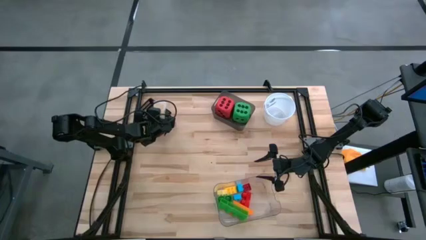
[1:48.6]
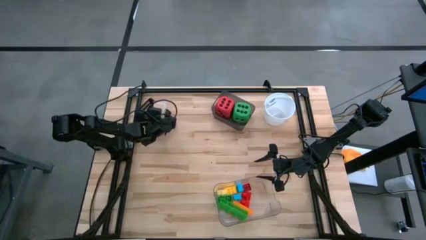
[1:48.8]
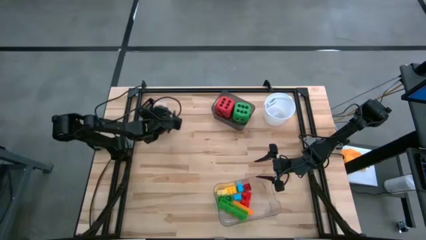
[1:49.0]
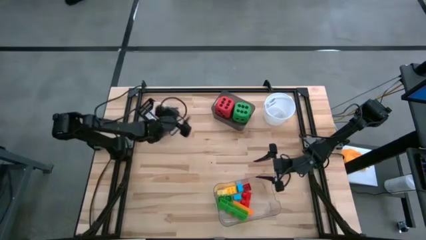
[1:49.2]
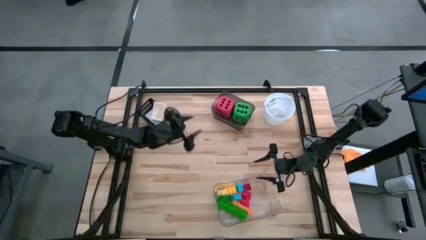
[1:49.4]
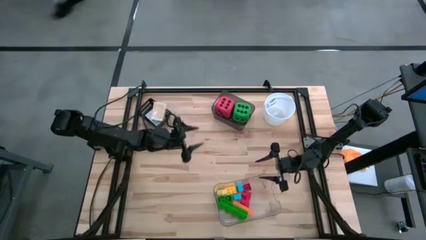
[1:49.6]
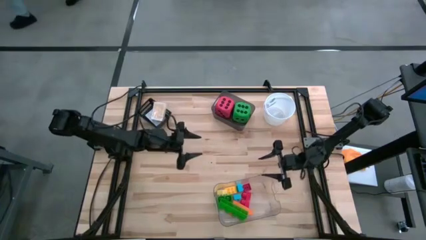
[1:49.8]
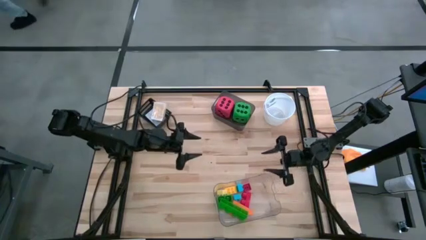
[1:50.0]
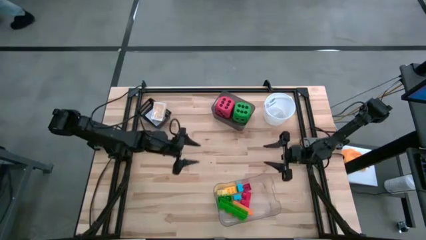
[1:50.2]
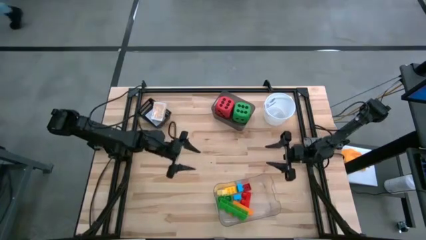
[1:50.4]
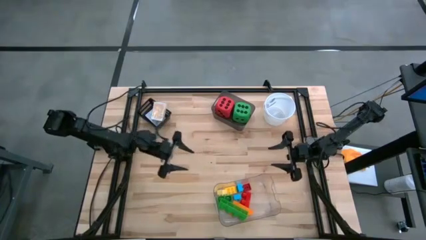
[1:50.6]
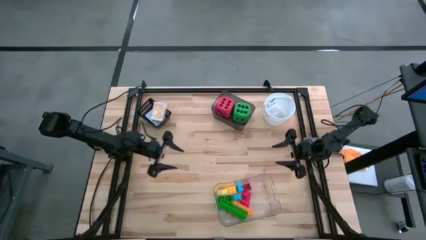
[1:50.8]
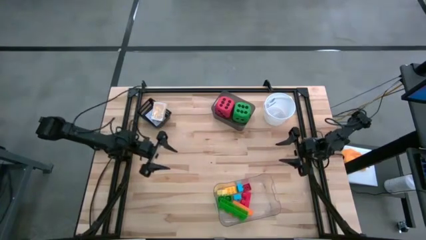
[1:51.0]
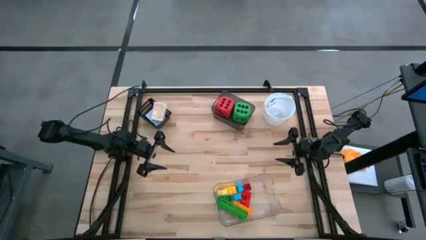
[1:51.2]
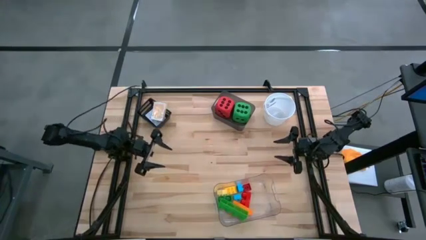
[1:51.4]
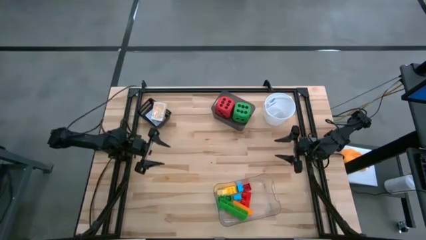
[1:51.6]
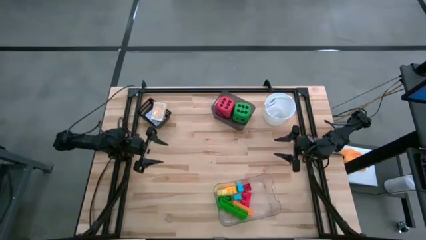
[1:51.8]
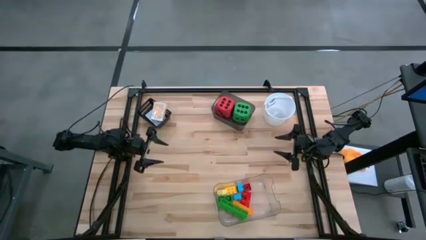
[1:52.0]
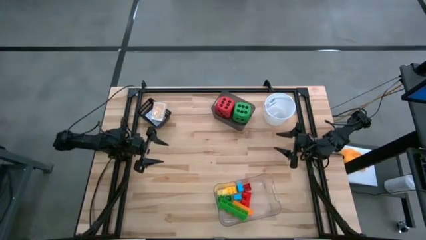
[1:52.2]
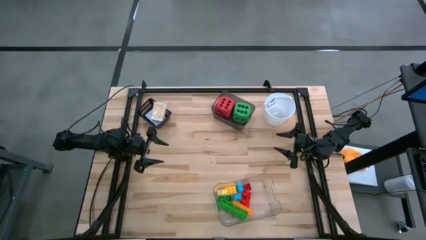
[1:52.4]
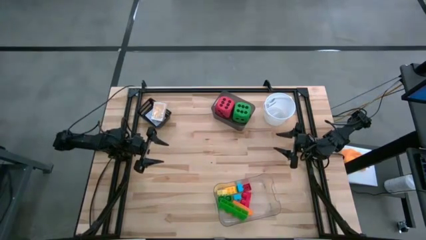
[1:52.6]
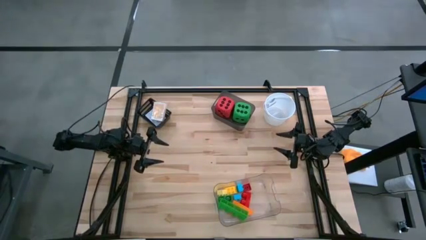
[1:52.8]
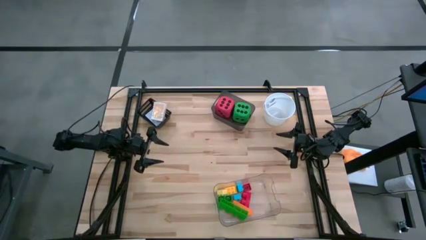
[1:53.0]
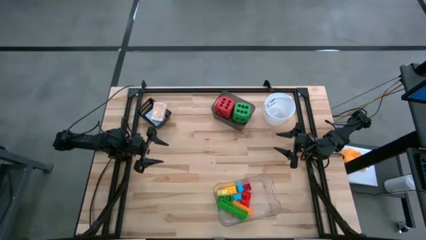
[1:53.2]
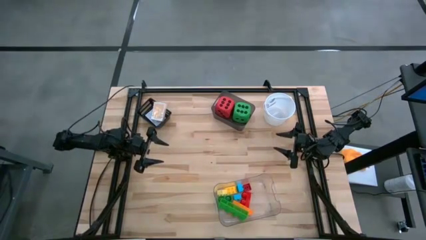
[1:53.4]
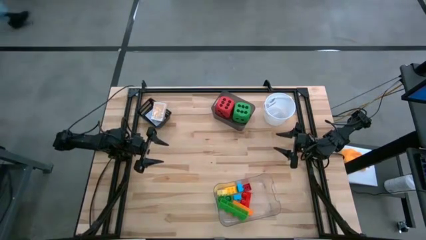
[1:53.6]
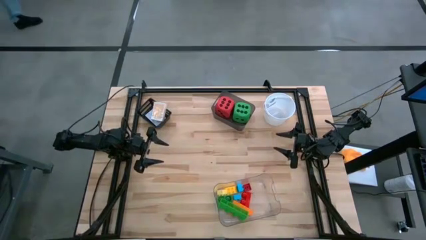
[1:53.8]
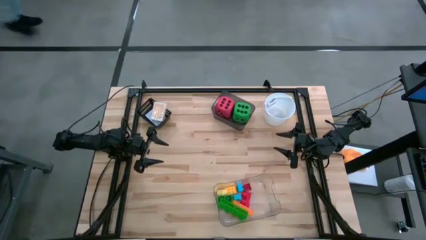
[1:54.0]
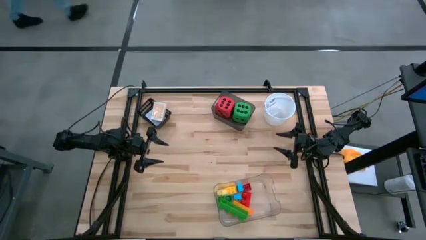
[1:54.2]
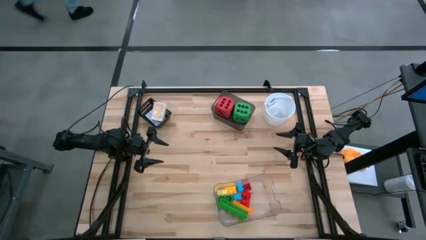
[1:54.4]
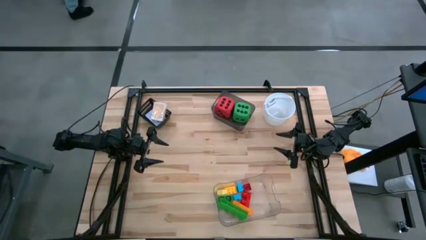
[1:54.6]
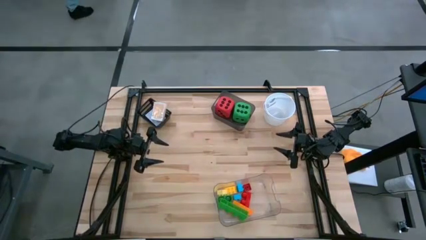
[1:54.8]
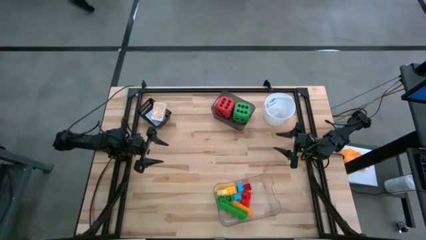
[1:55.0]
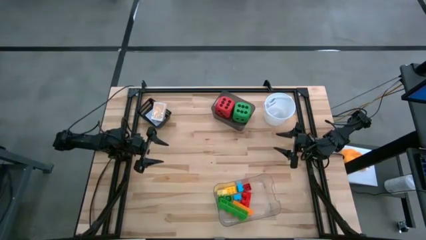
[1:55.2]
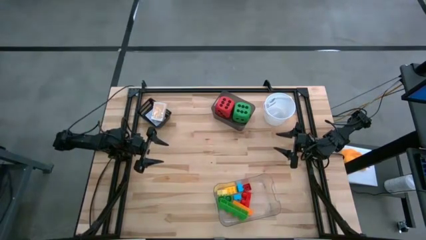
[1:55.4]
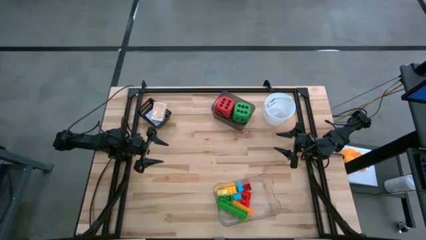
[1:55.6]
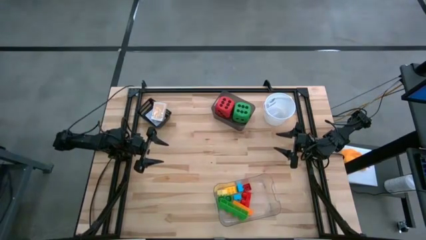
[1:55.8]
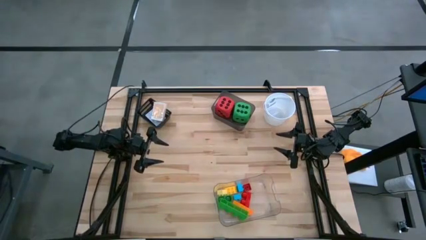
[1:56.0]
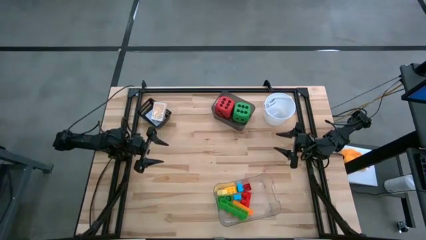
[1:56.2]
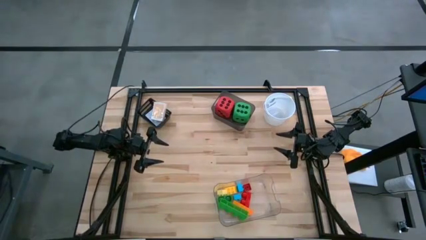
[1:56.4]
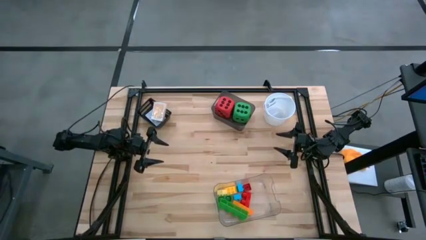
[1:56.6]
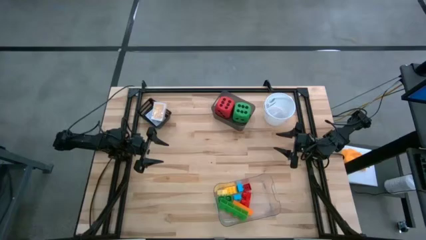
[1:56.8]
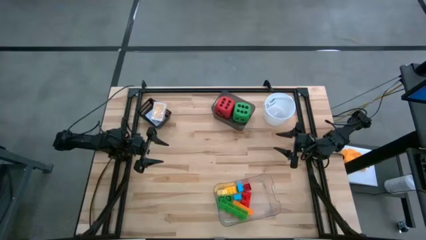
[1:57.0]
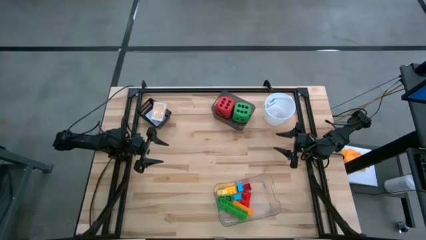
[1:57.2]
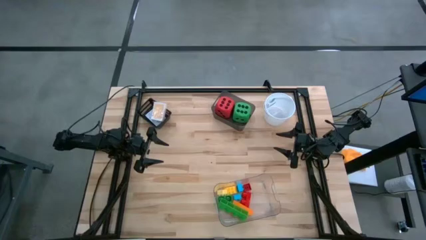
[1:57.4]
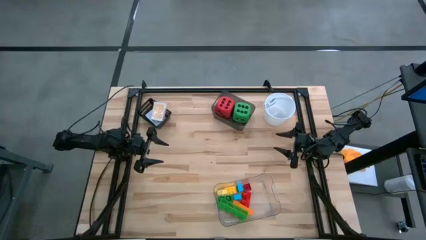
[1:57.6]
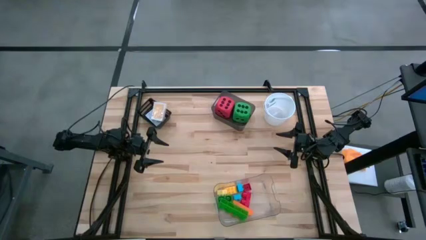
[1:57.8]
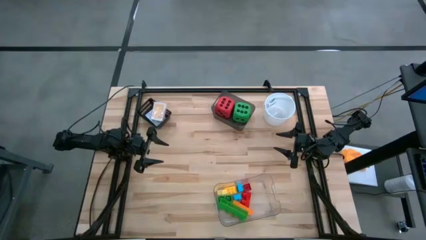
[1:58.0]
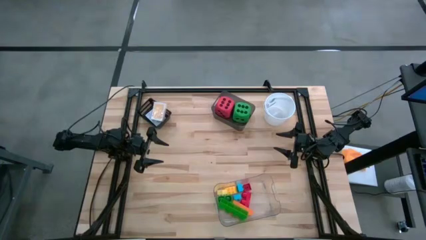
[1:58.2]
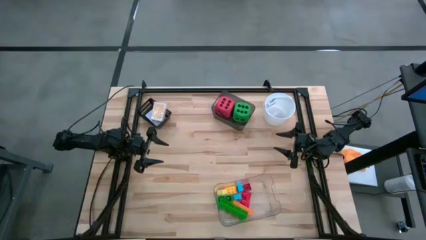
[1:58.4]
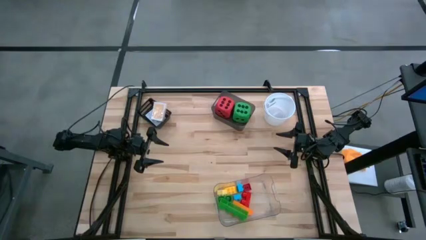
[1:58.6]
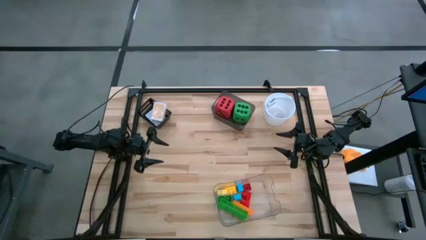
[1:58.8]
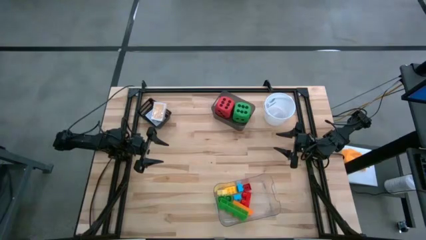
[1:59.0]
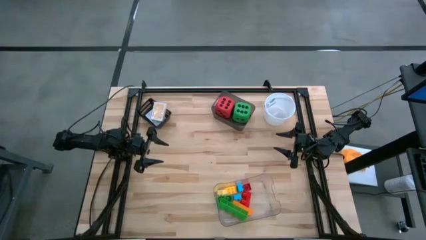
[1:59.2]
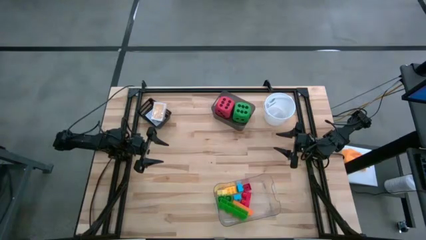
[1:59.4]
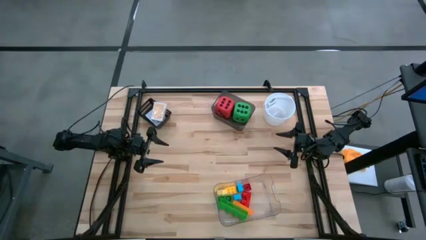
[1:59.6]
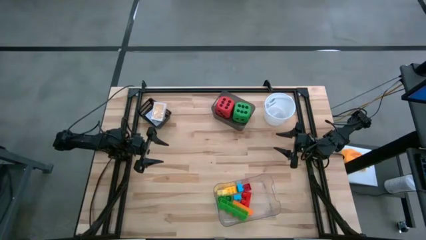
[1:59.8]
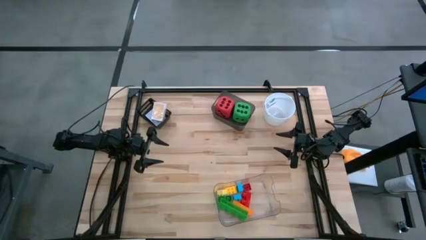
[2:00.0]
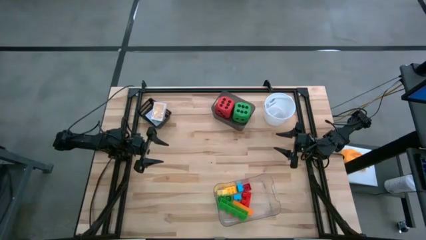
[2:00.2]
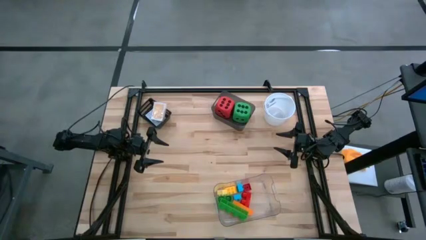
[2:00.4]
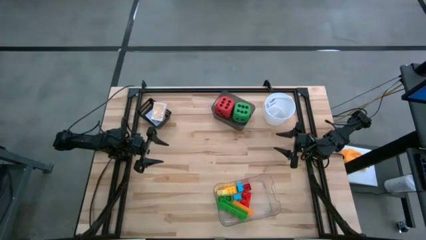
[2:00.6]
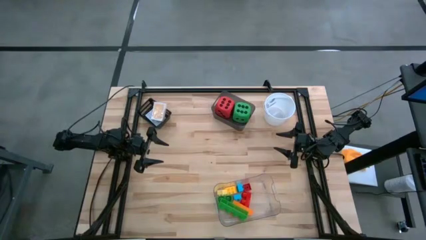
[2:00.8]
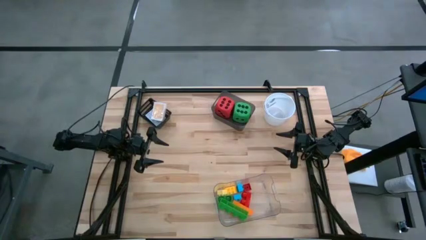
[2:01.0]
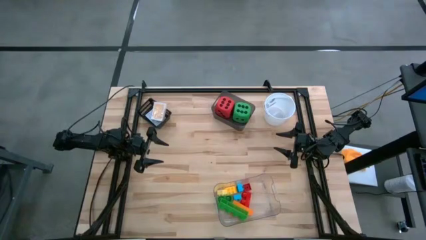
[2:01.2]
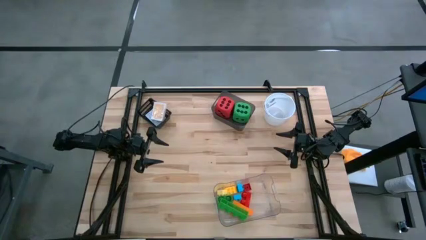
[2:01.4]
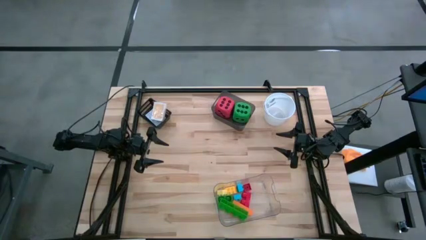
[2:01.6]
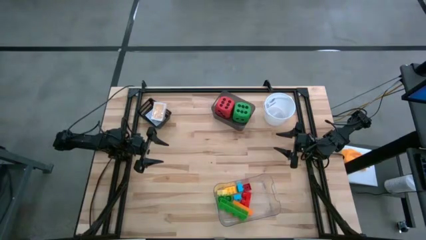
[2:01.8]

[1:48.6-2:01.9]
Task: Pick & Place Toys
Return to Home Position
